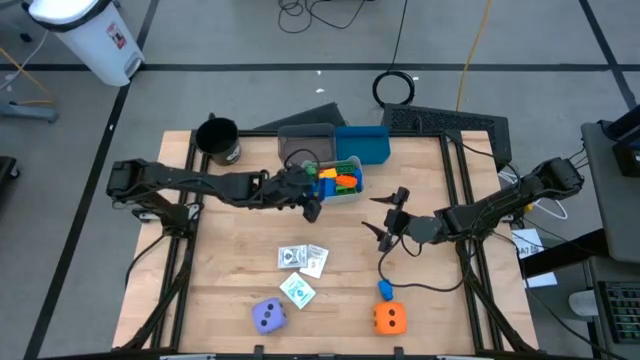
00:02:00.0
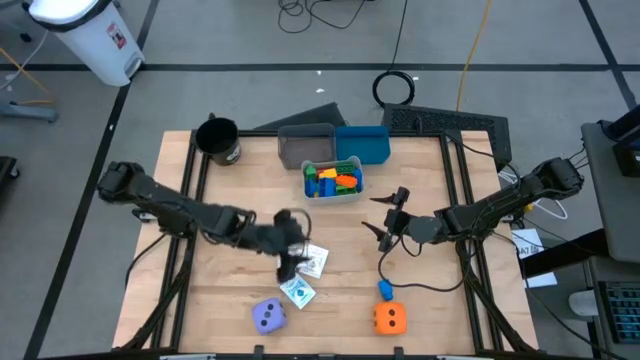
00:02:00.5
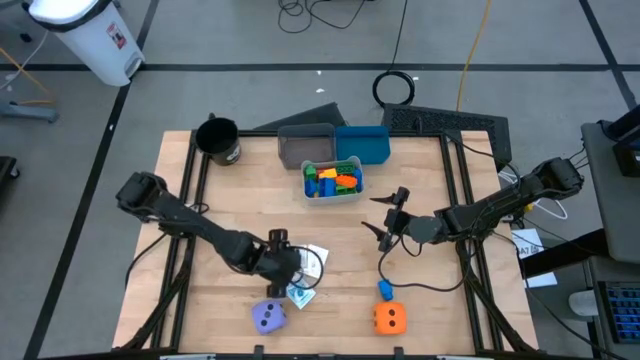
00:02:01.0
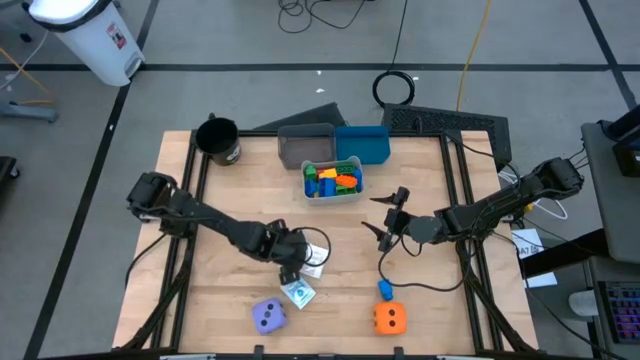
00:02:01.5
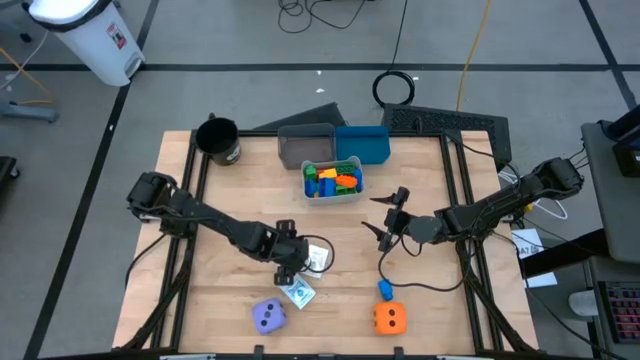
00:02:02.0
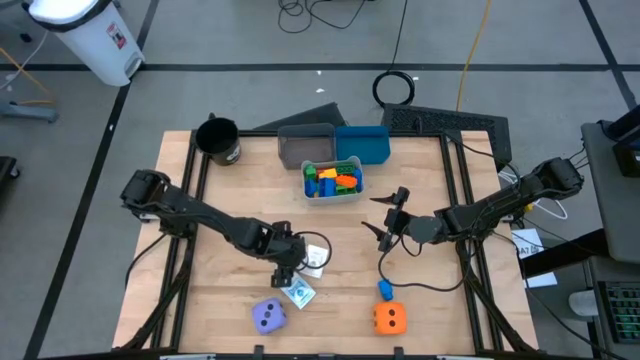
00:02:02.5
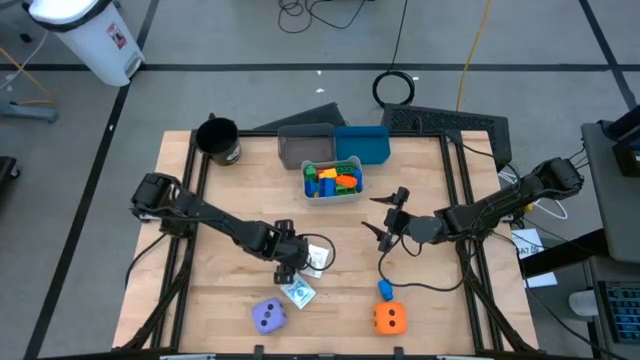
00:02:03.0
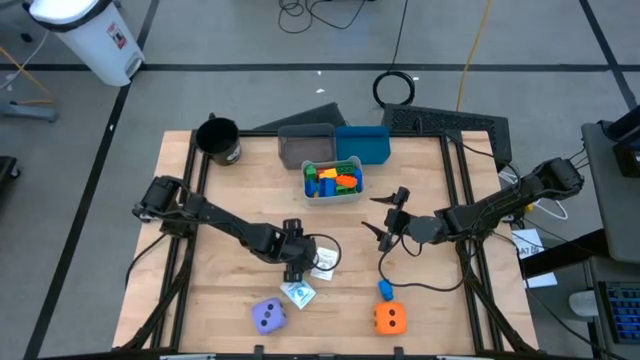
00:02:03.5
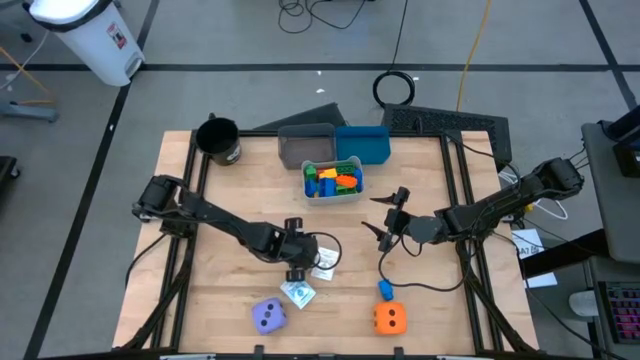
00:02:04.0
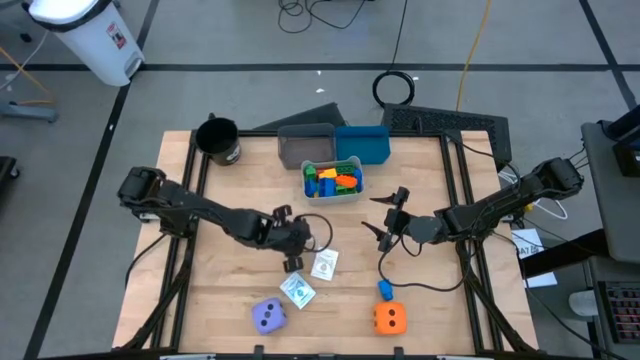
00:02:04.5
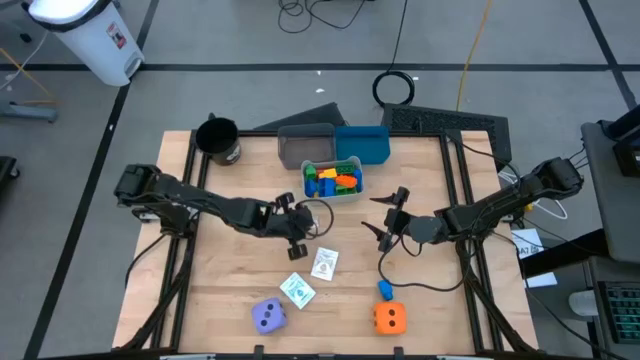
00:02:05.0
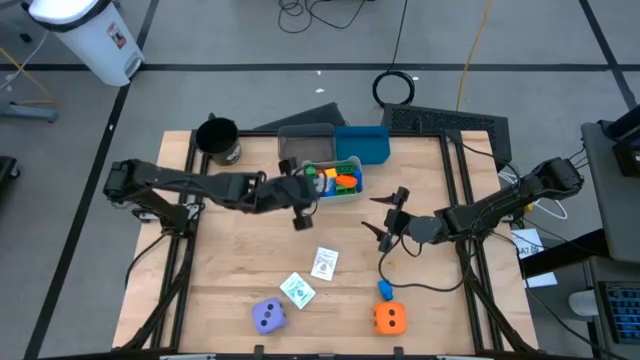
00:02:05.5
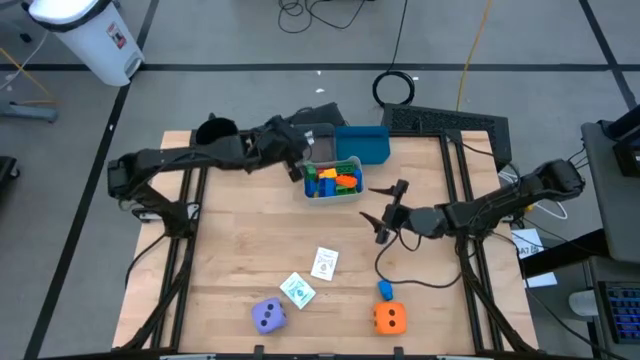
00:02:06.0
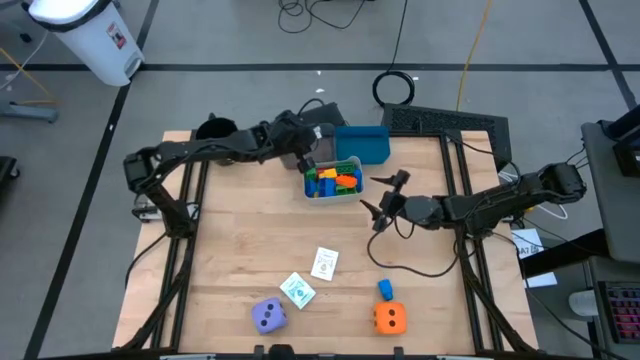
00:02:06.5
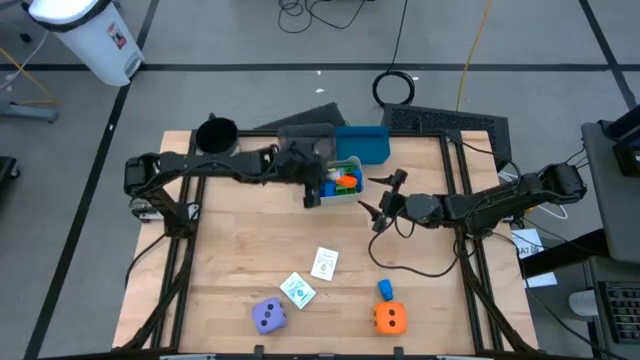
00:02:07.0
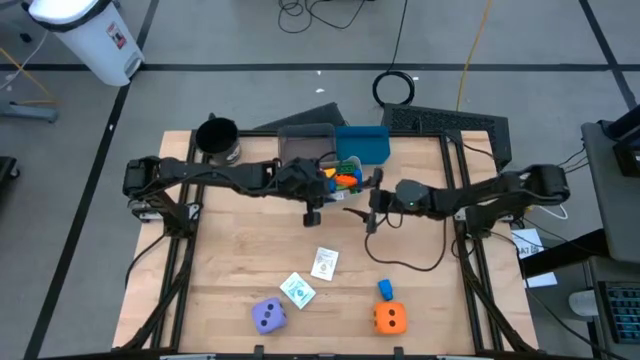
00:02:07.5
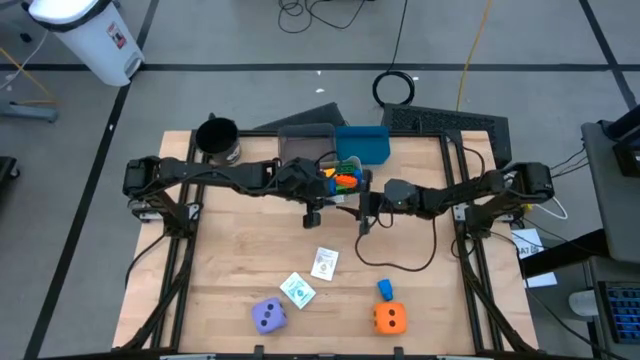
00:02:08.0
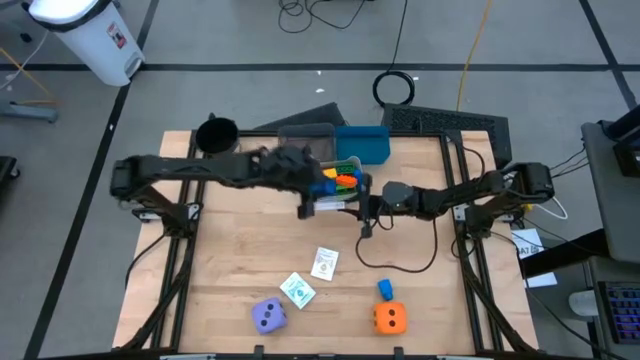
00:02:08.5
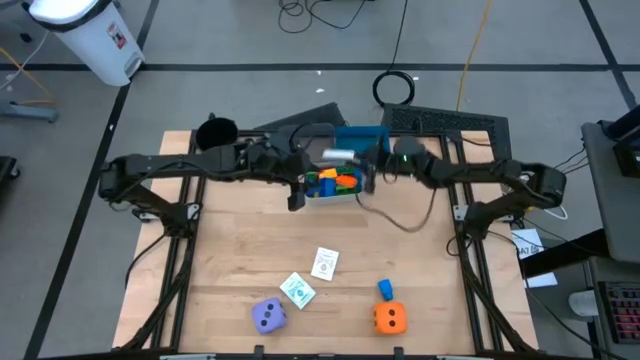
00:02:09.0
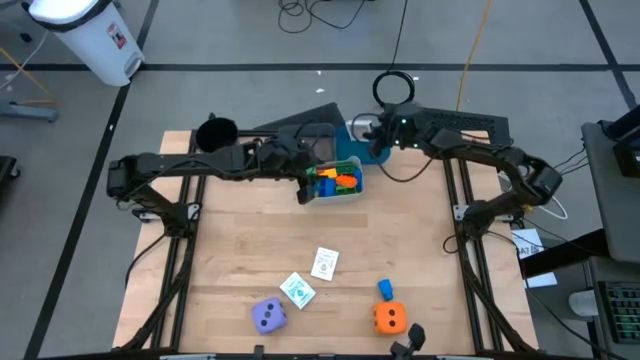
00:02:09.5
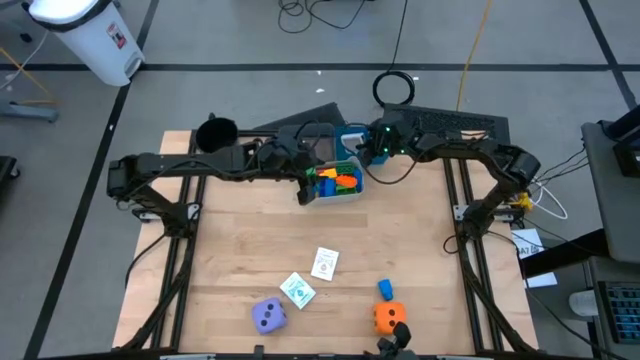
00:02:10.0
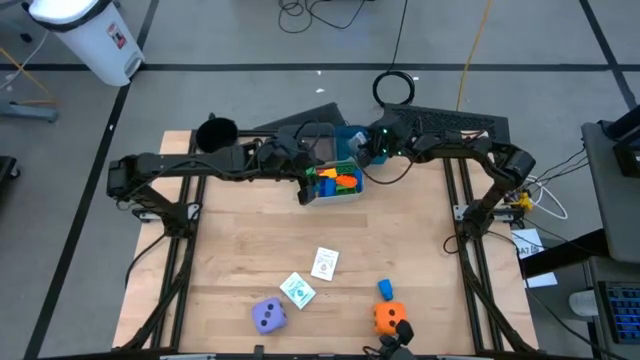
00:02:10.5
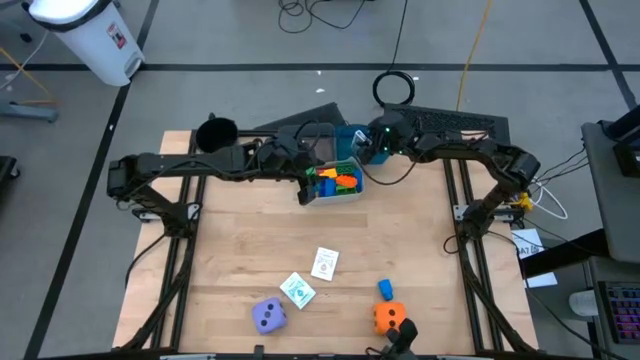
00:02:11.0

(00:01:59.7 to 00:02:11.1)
Task: Pick & Place Toys
Put the black deck of cards into the blue bin

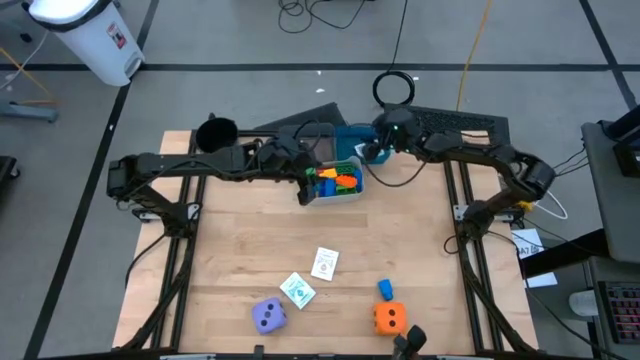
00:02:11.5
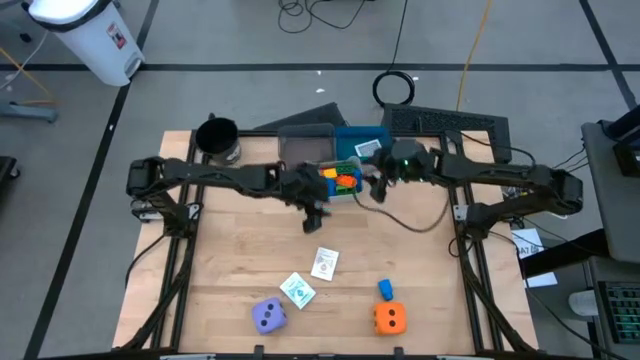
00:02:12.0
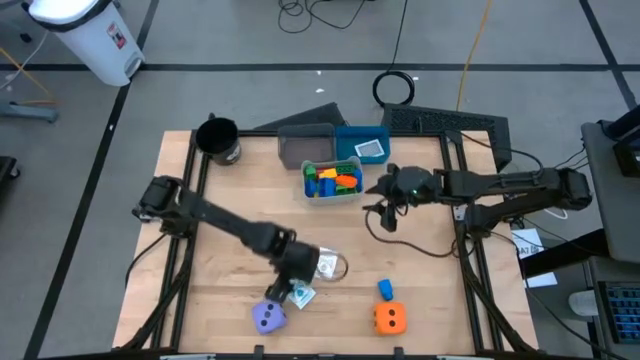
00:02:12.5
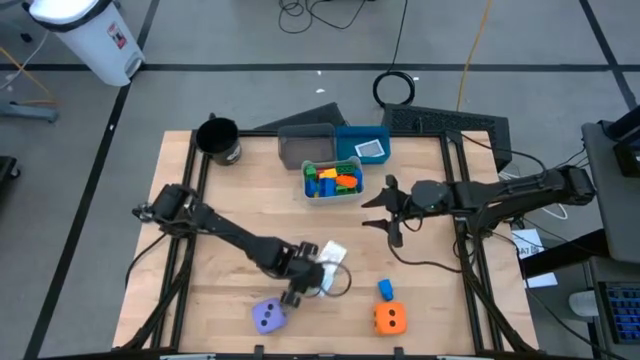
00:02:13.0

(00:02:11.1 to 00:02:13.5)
Adjust the deck of cards

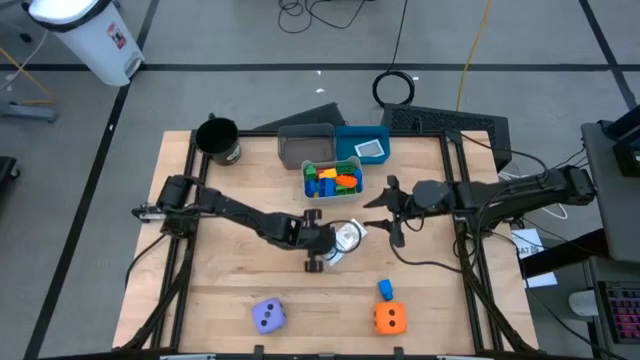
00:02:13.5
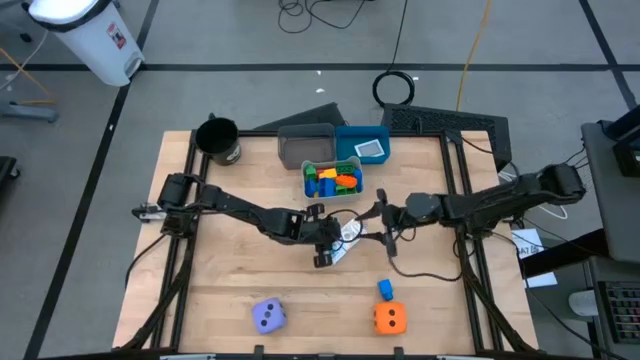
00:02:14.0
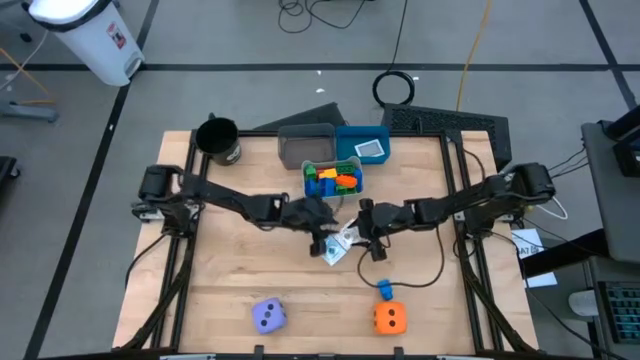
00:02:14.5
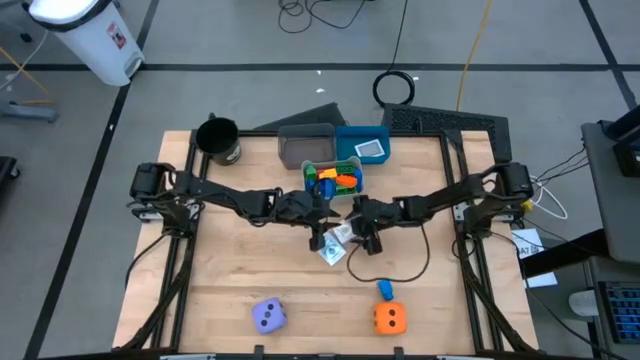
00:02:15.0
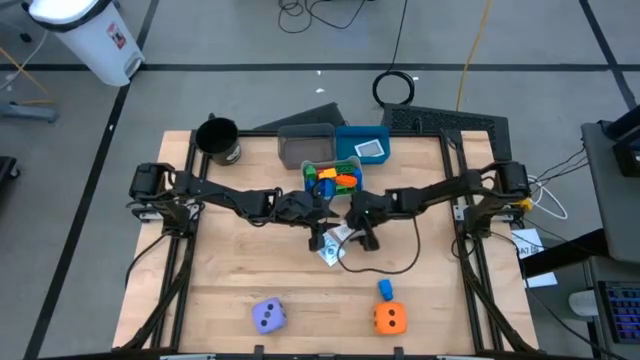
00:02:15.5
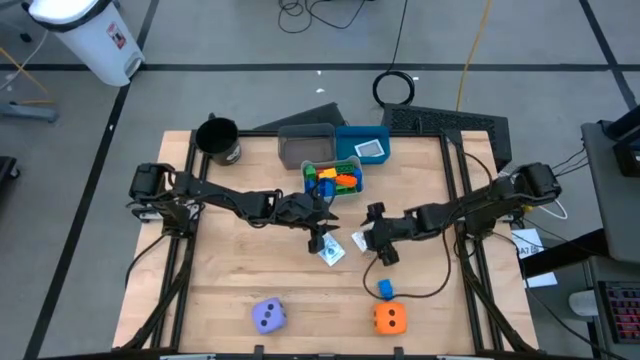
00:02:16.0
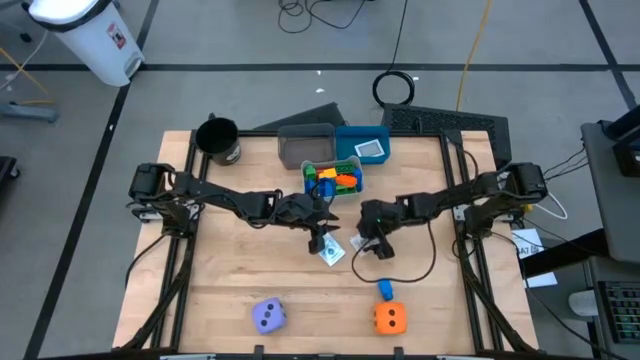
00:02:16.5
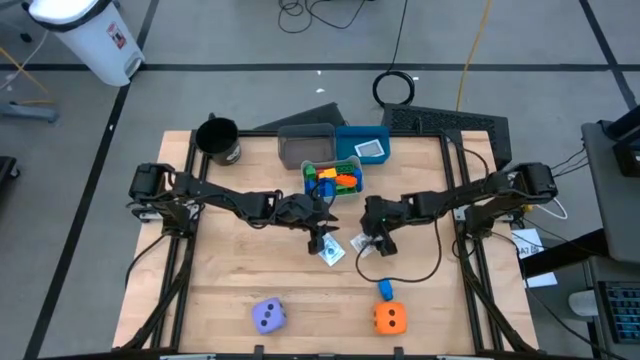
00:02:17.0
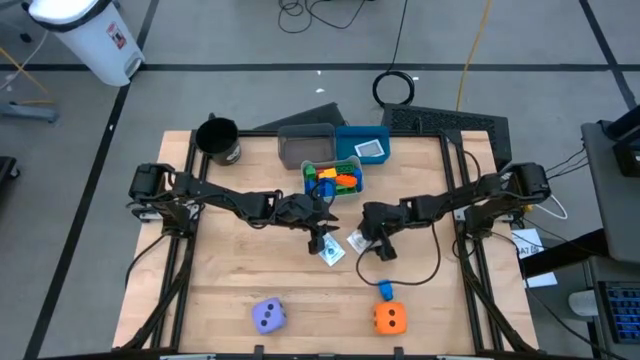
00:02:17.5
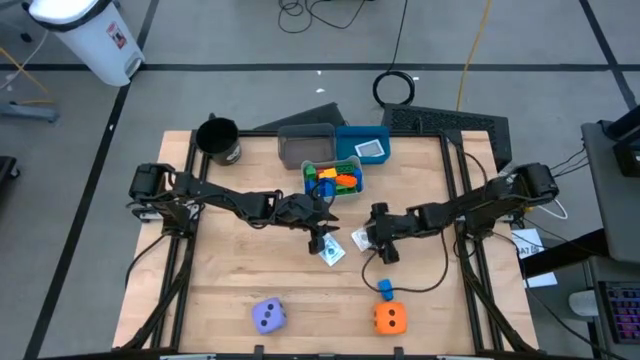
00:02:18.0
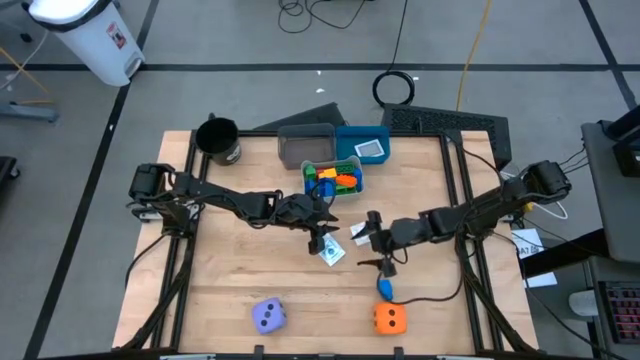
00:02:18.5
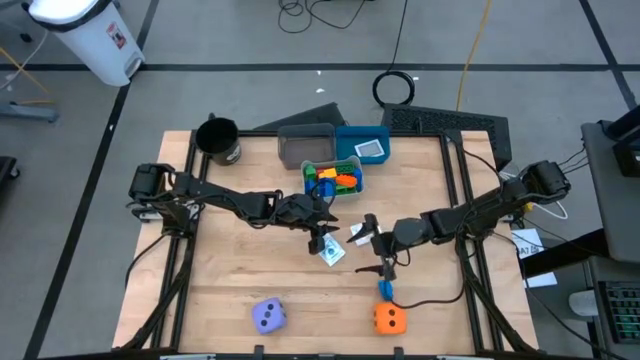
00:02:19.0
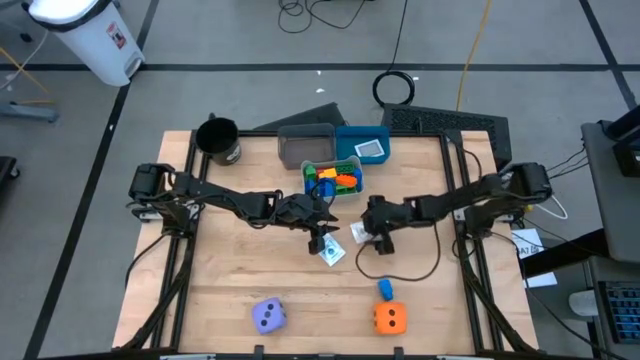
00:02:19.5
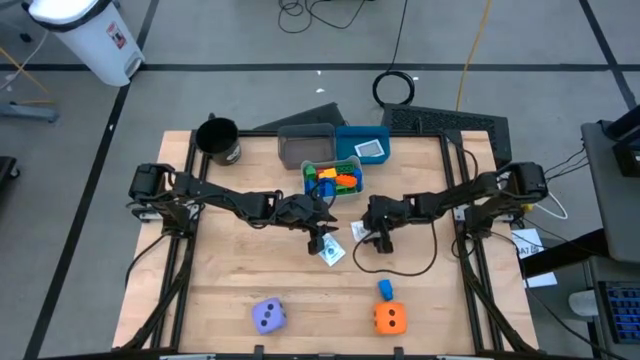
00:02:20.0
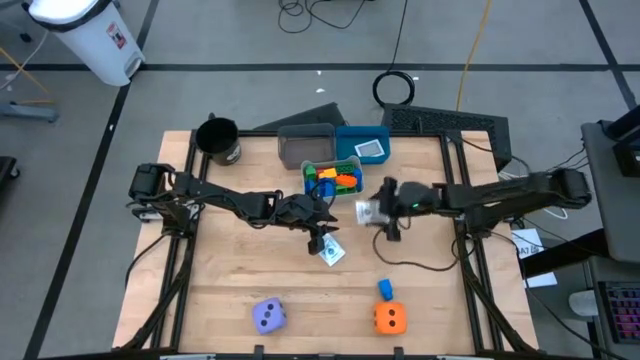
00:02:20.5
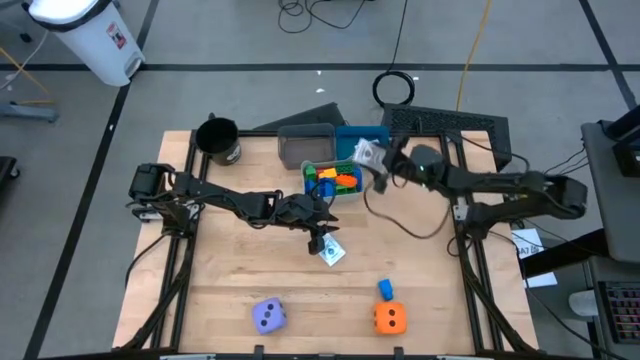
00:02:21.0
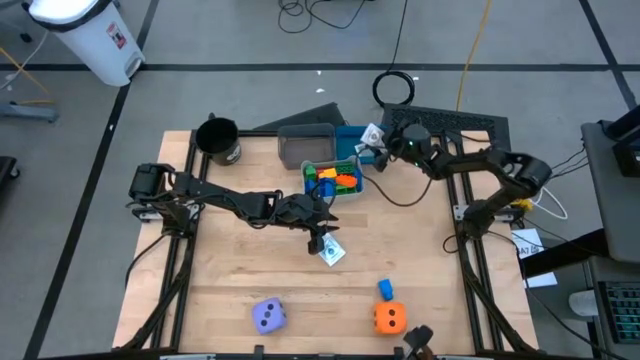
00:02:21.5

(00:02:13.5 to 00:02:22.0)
Put the brown deck of cards into the blue bin
